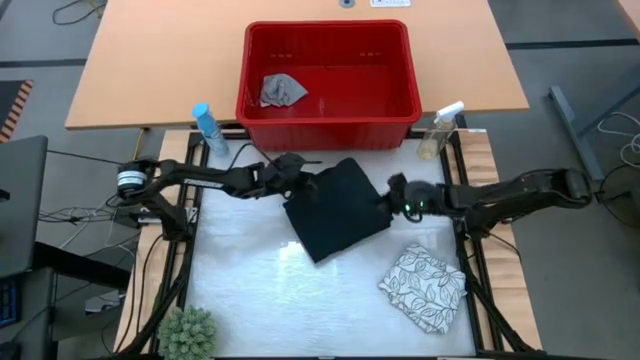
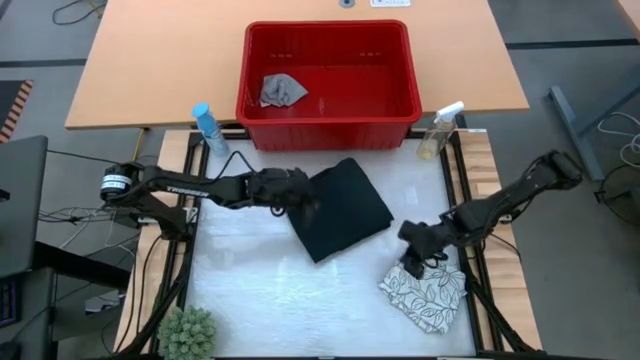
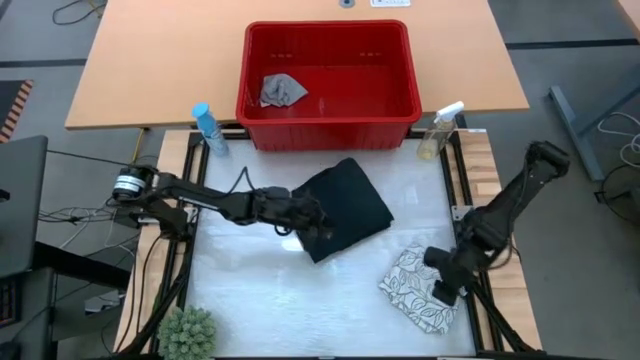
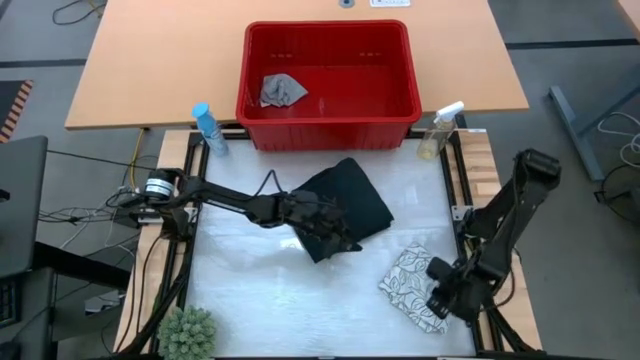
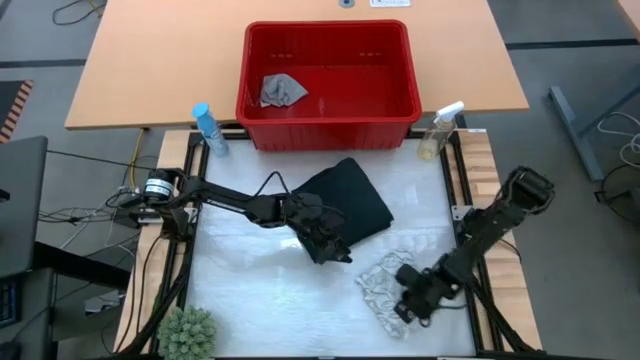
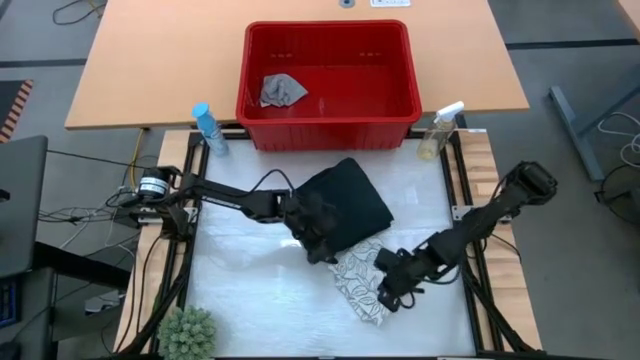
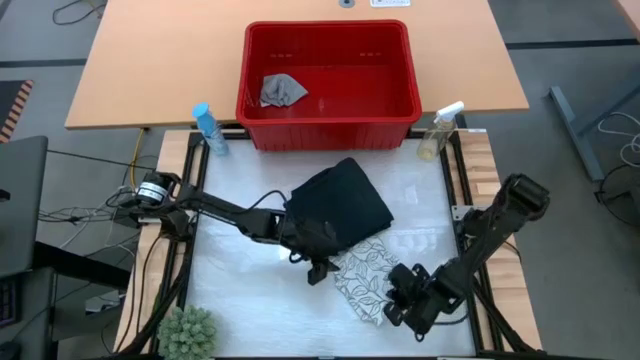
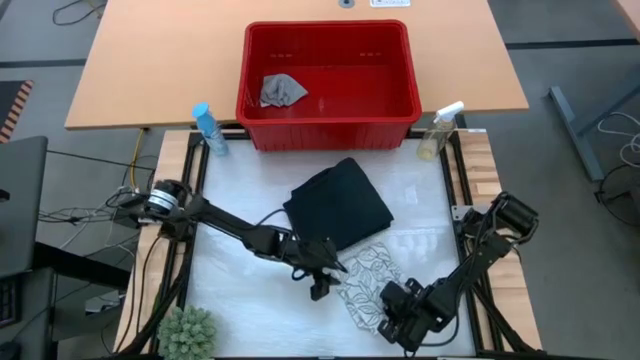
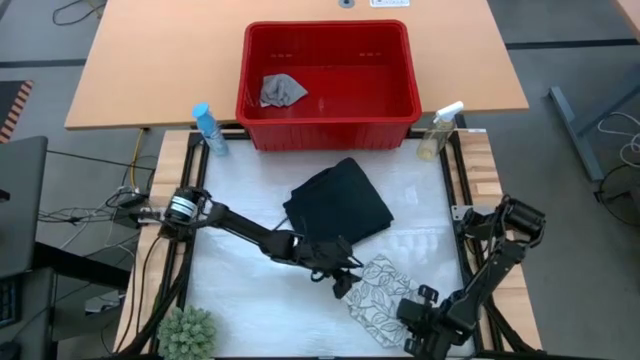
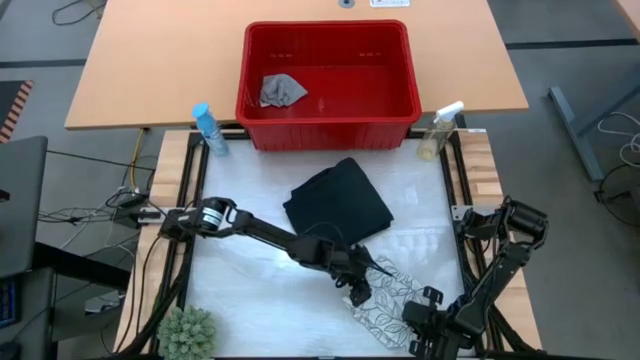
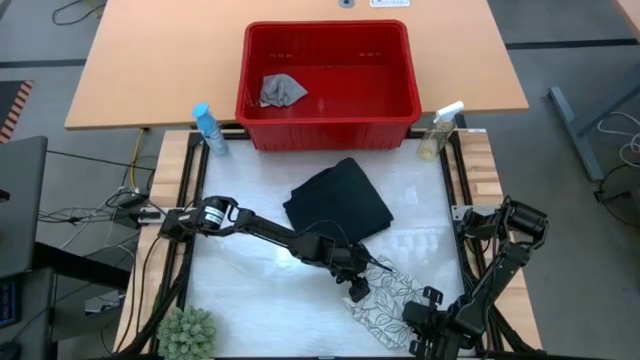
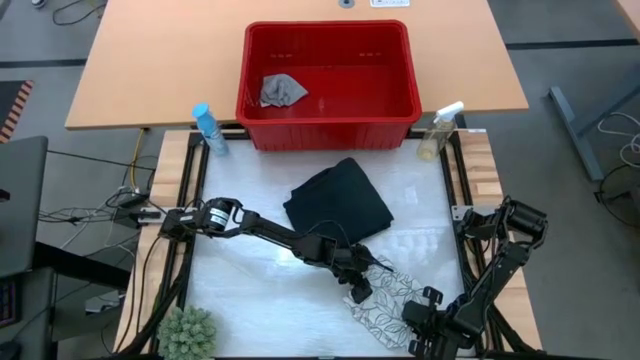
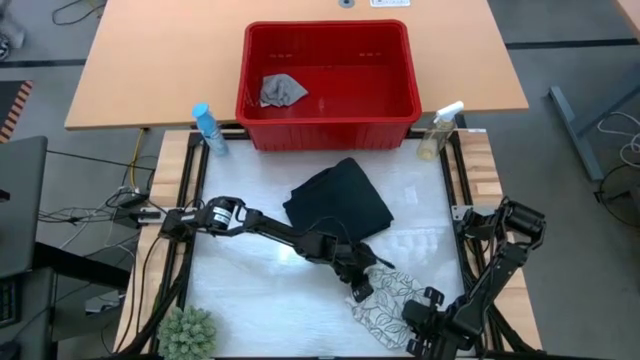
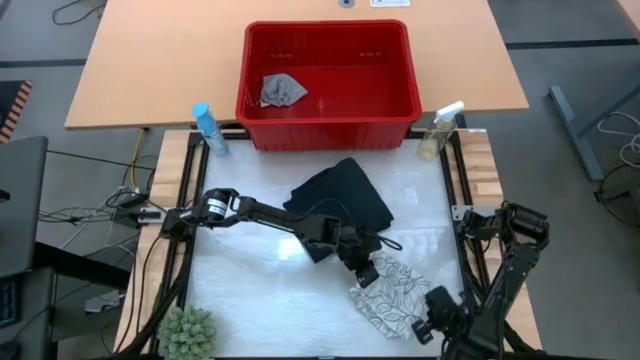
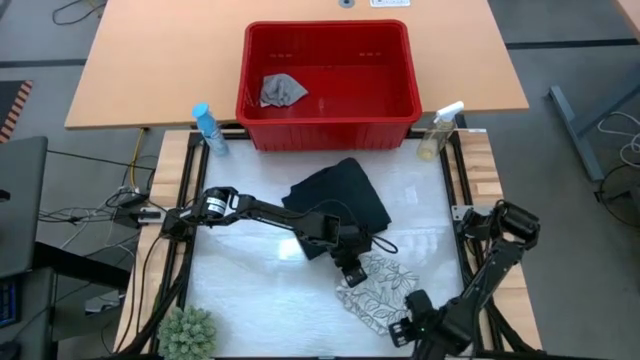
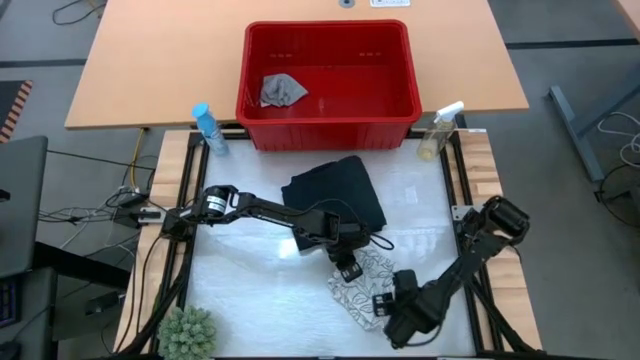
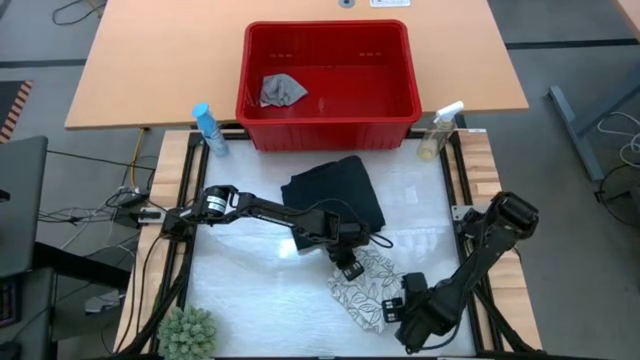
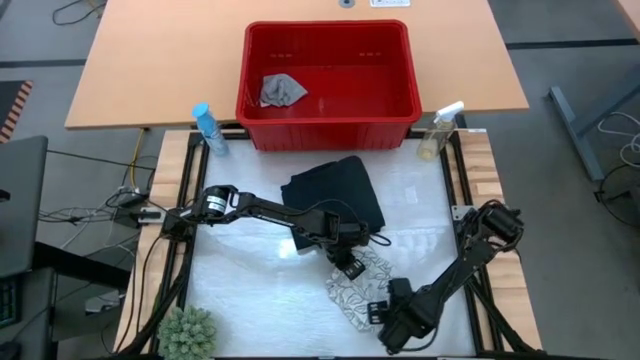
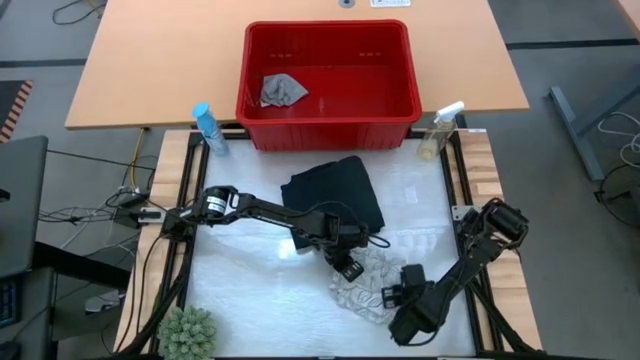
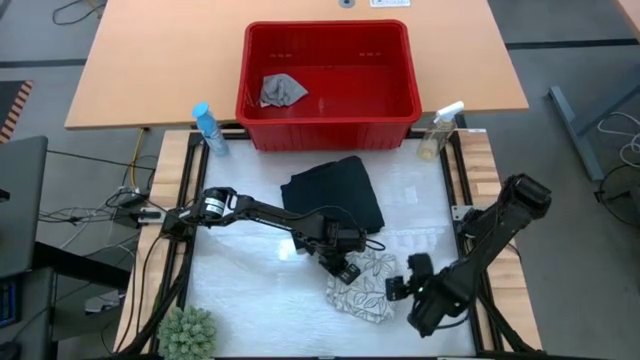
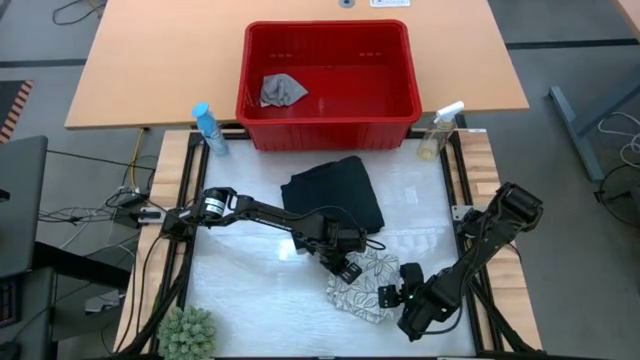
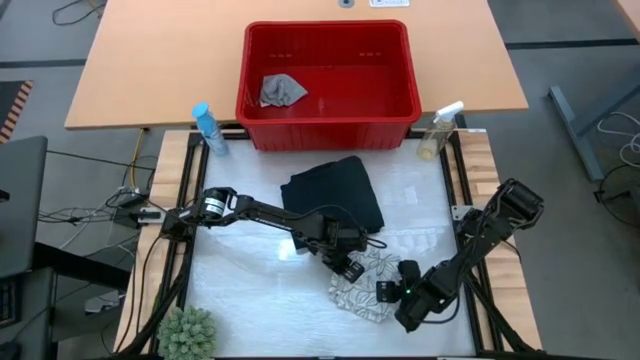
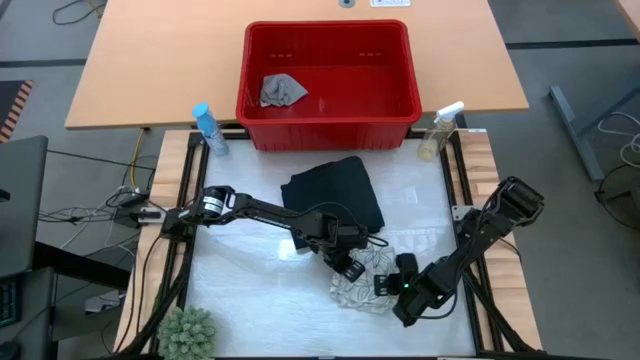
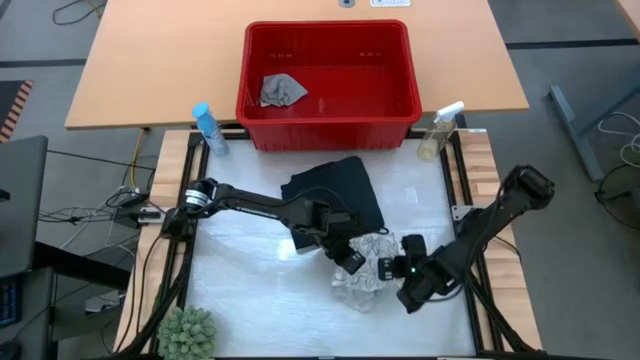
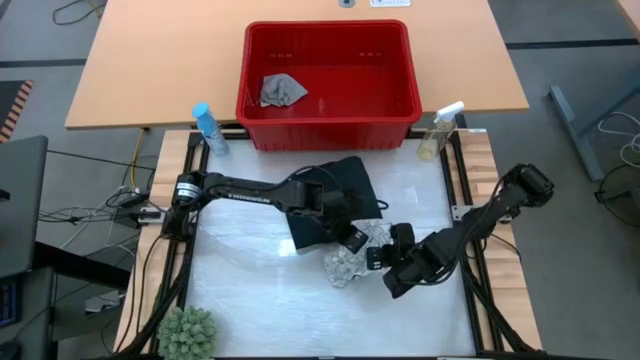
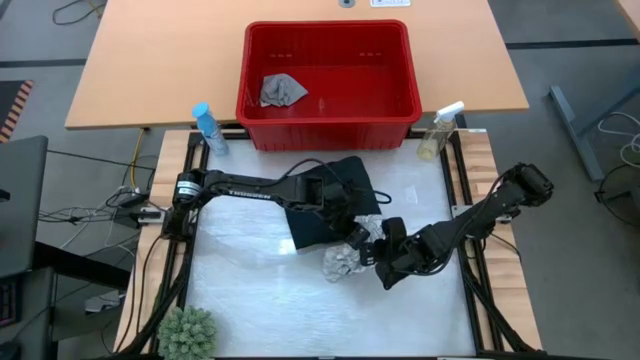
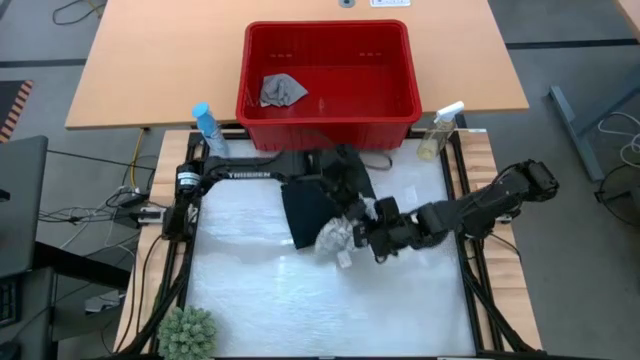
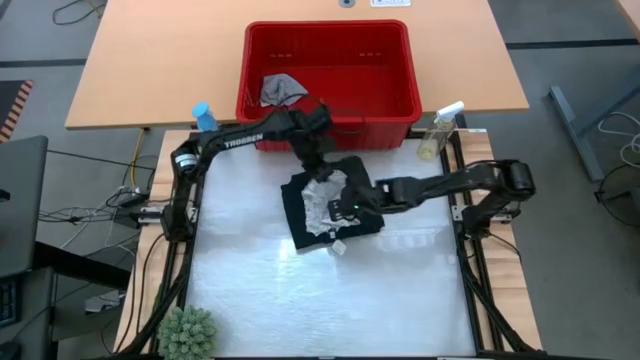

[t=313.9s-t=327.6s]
Task: Fold laundry
Stack the white-patterned shirt on top of the dark blue pants

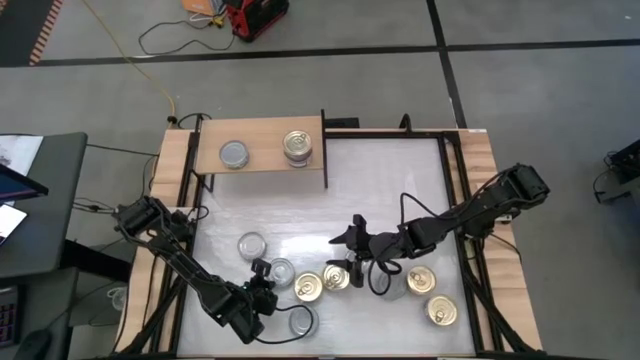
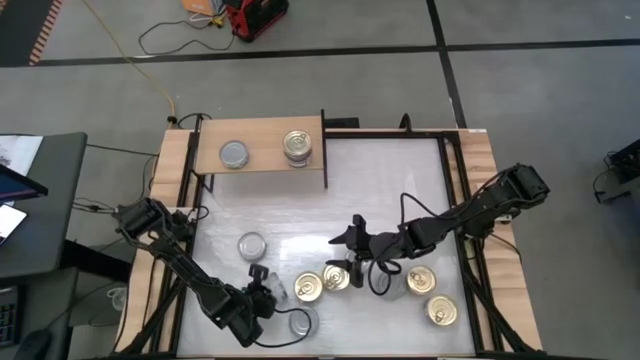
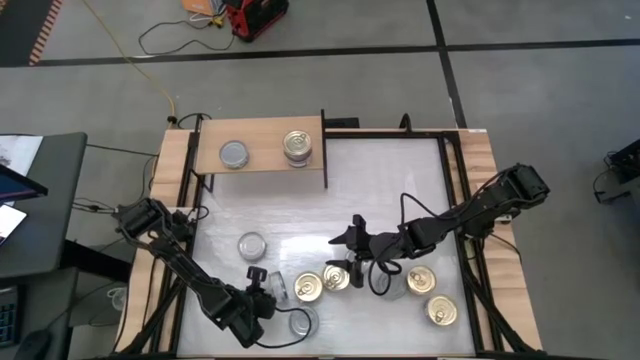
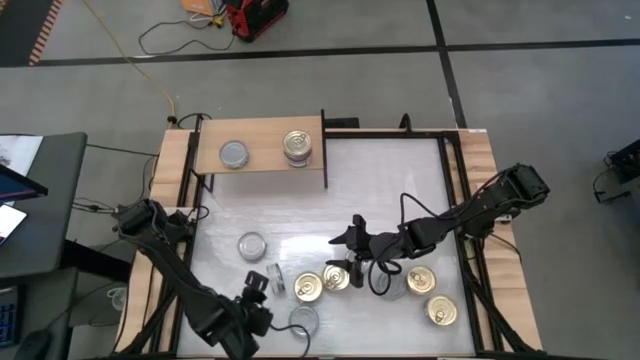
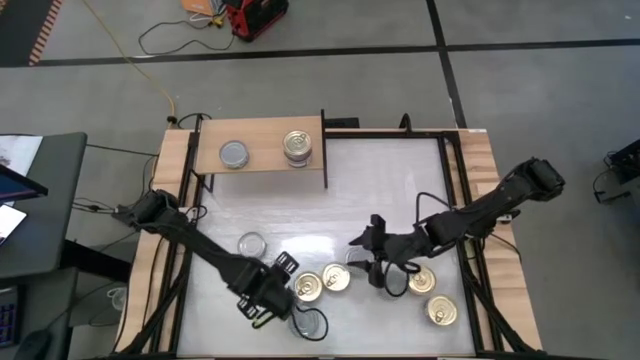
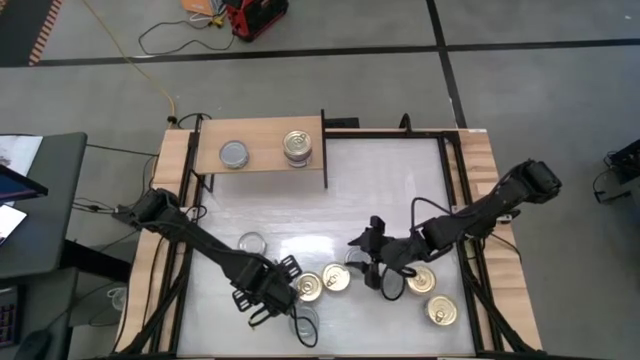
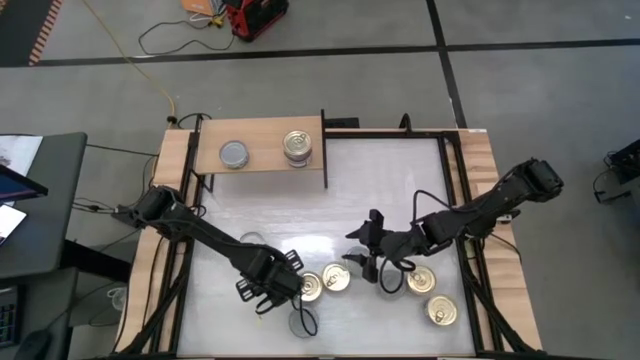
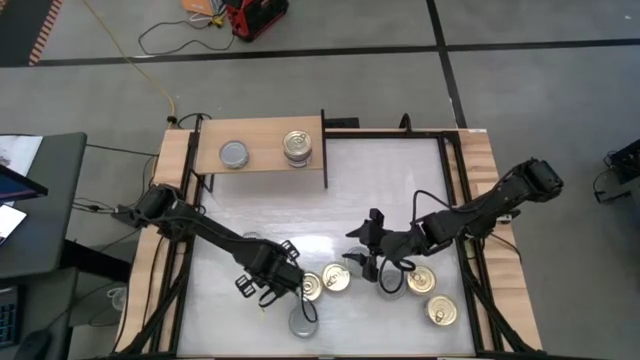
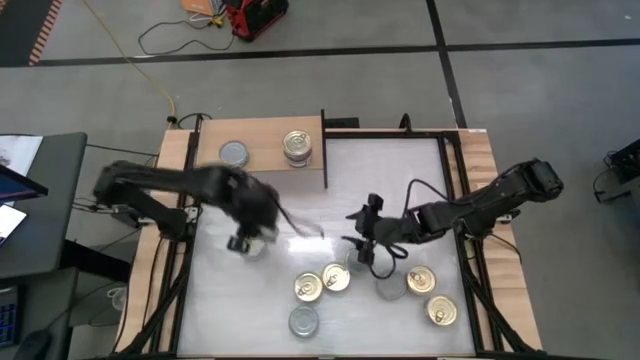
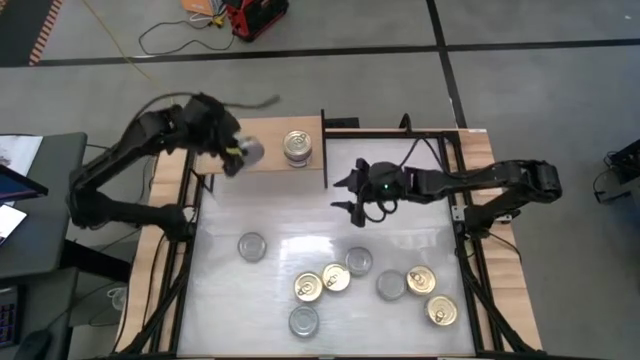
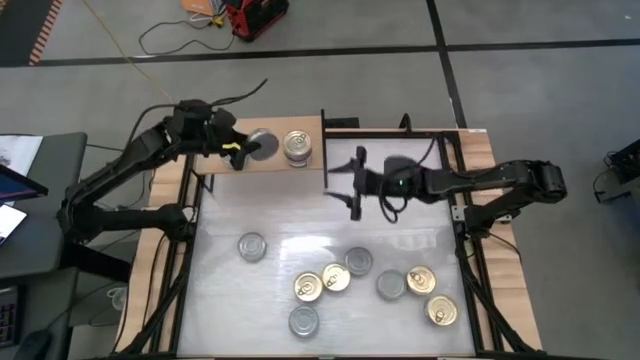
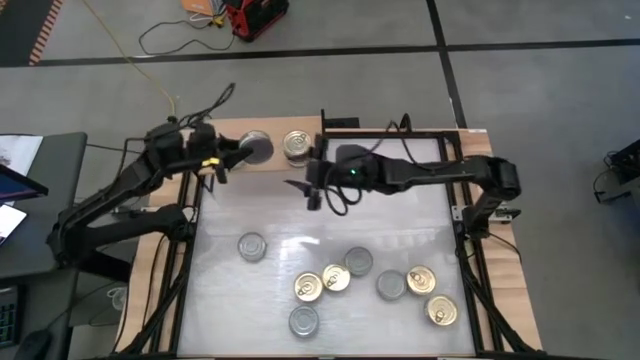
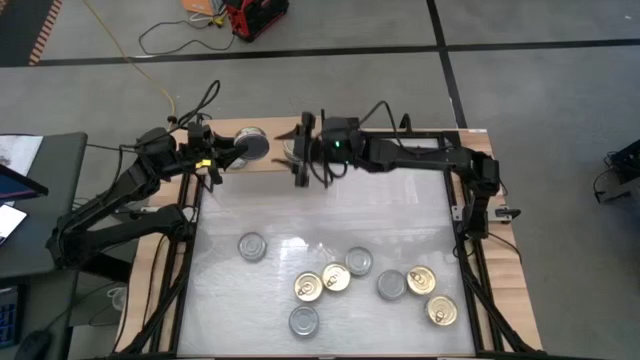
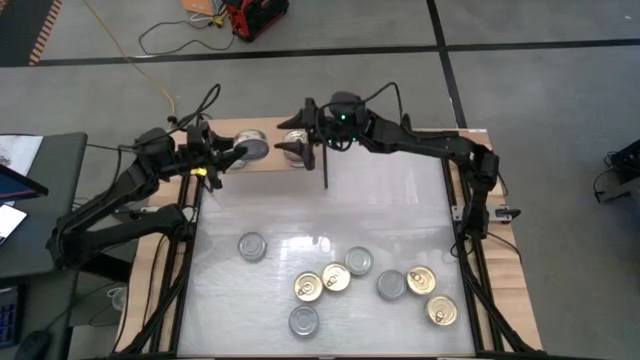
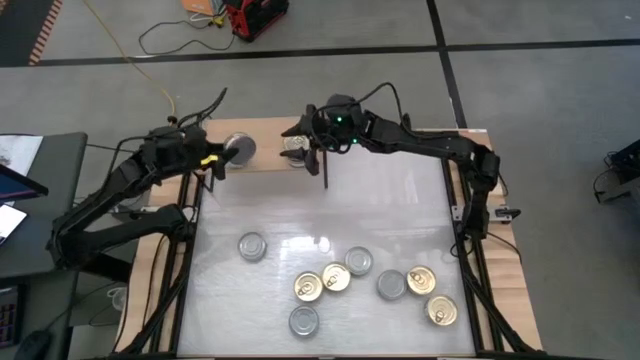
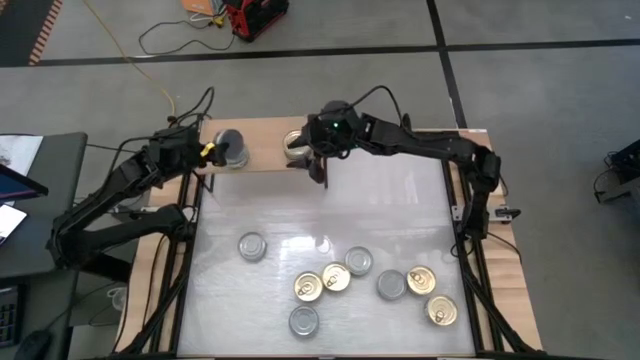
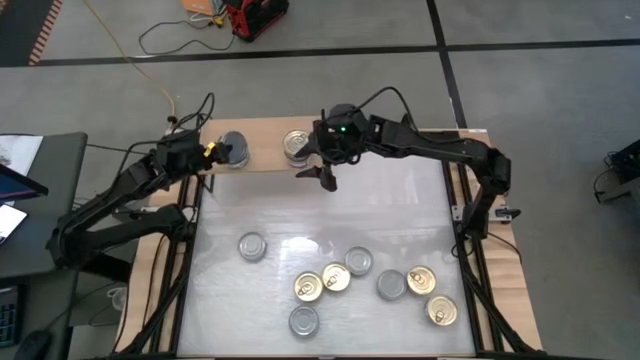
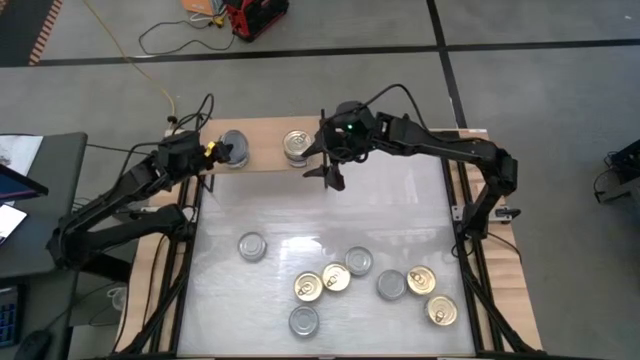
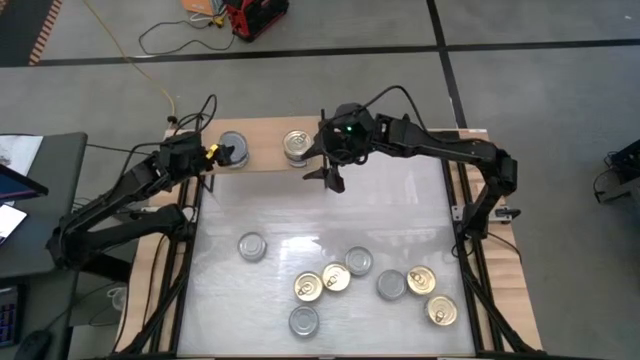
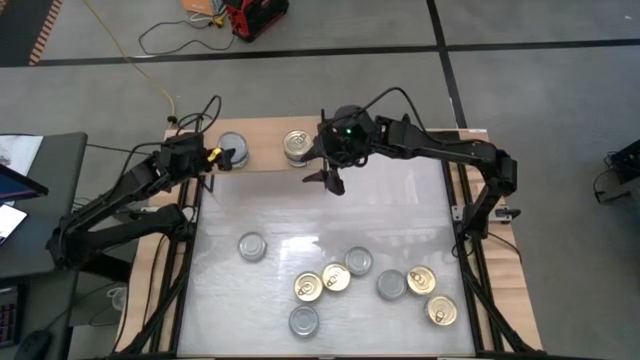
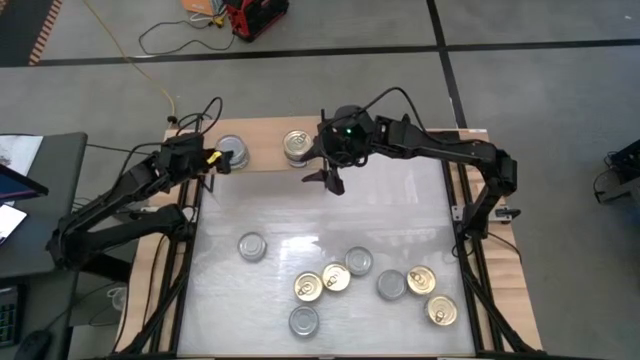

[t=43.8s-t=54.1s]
Task: Stack canned seafood by type on shelf
Stack the green-white tuna can on top of the green-white tuna can on the shelf
